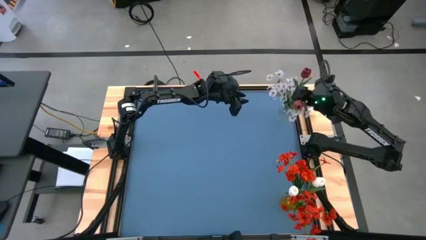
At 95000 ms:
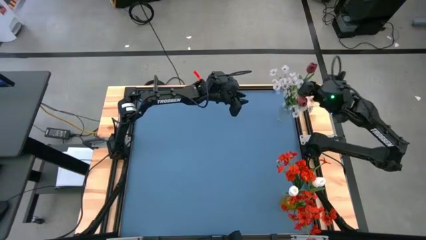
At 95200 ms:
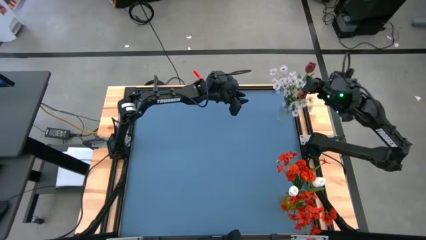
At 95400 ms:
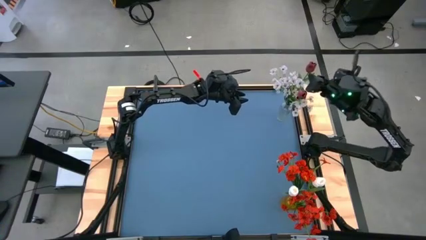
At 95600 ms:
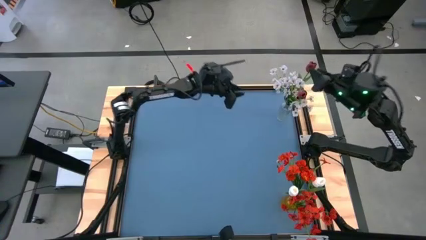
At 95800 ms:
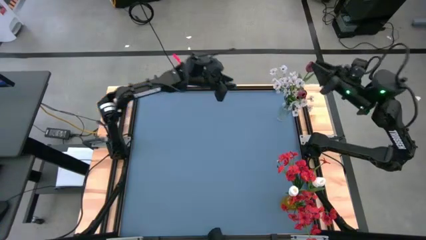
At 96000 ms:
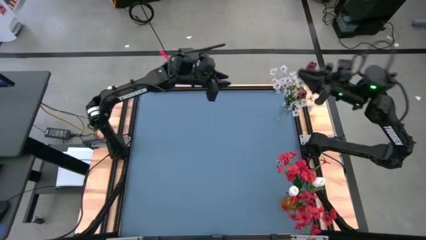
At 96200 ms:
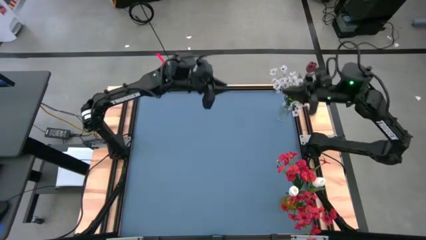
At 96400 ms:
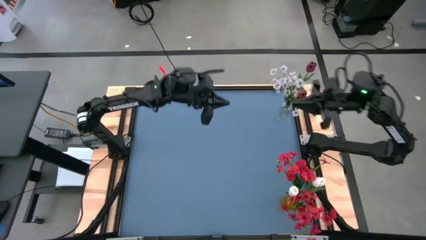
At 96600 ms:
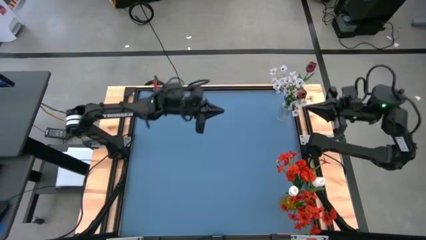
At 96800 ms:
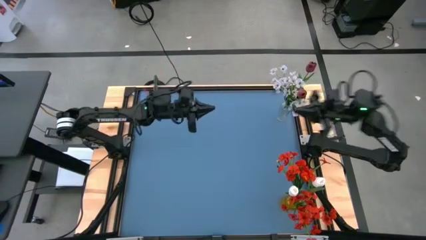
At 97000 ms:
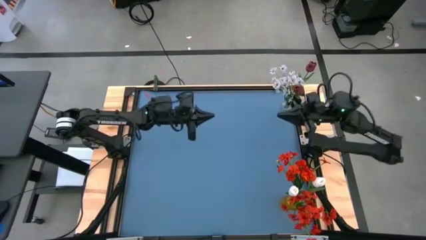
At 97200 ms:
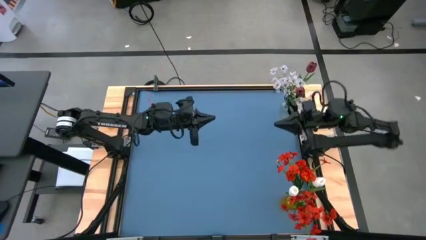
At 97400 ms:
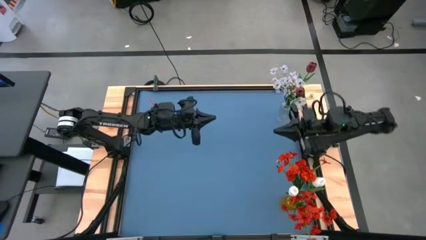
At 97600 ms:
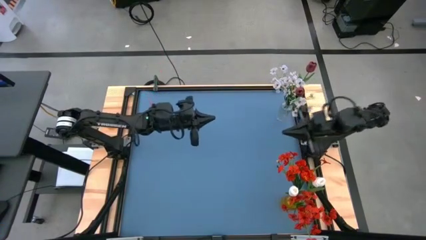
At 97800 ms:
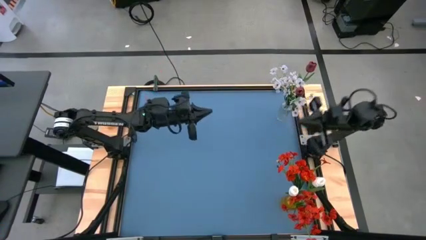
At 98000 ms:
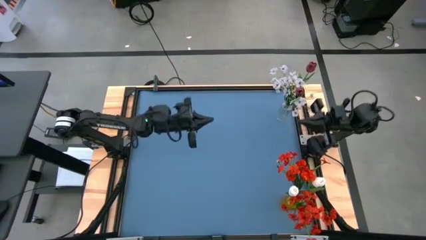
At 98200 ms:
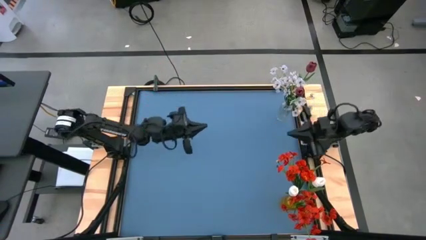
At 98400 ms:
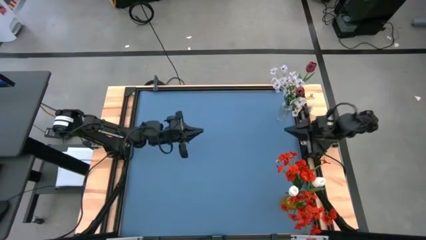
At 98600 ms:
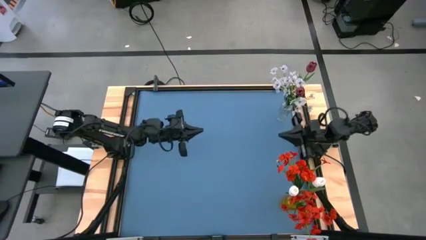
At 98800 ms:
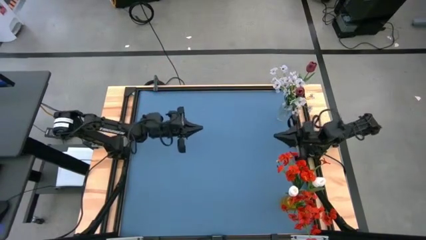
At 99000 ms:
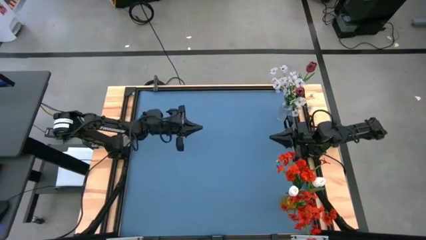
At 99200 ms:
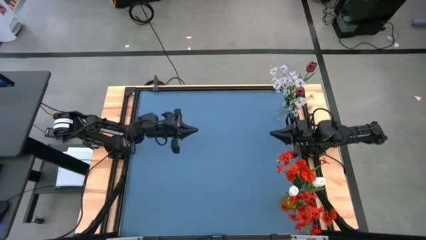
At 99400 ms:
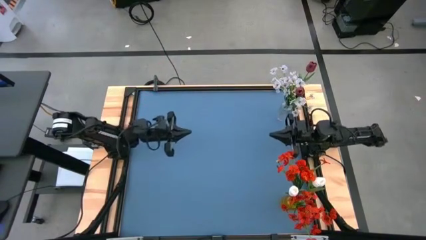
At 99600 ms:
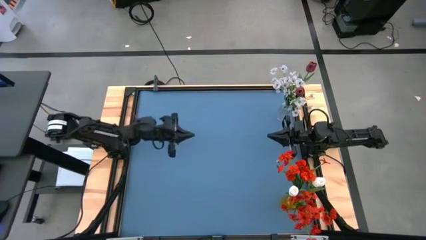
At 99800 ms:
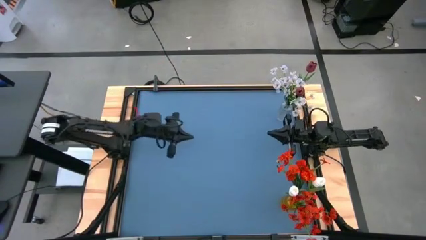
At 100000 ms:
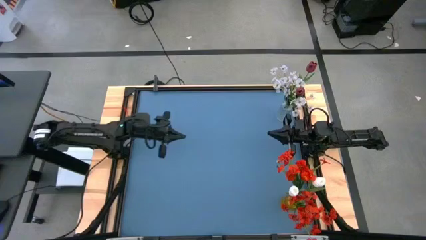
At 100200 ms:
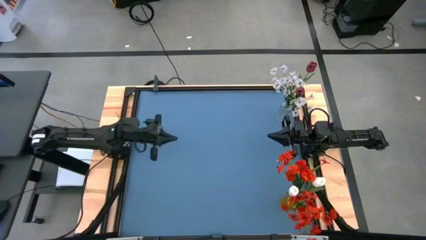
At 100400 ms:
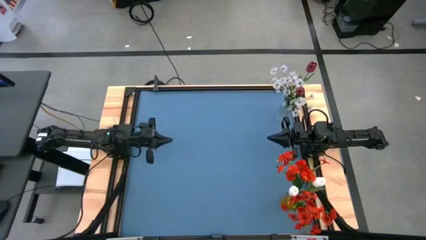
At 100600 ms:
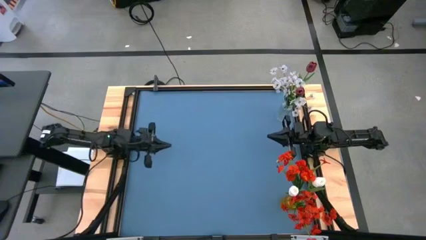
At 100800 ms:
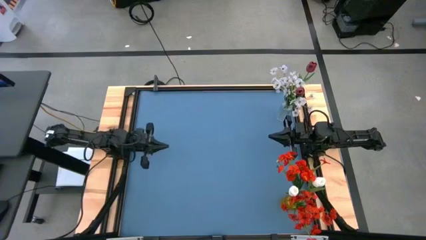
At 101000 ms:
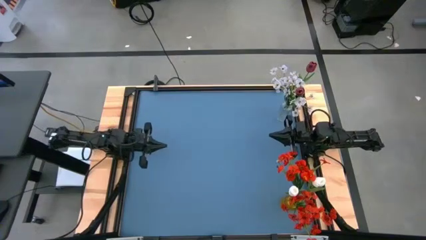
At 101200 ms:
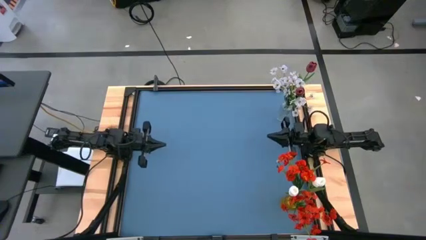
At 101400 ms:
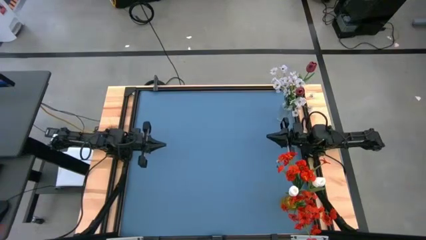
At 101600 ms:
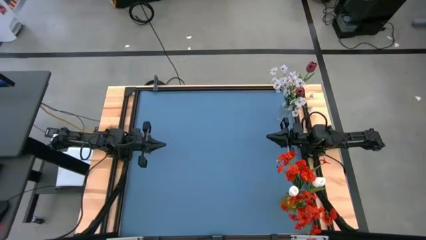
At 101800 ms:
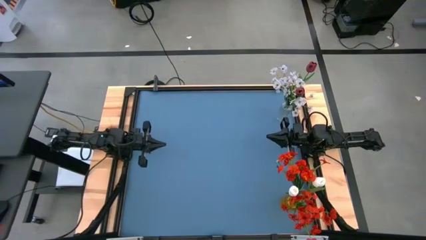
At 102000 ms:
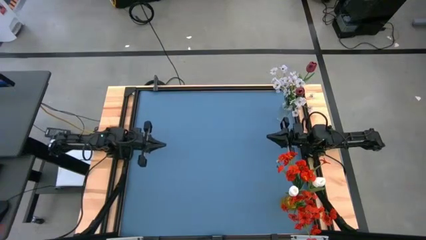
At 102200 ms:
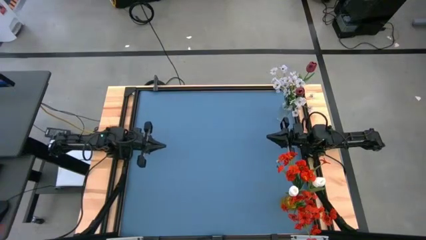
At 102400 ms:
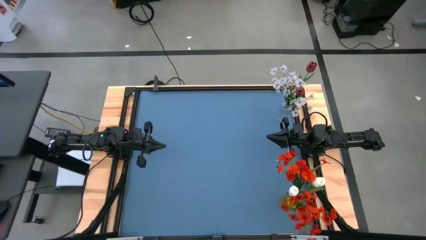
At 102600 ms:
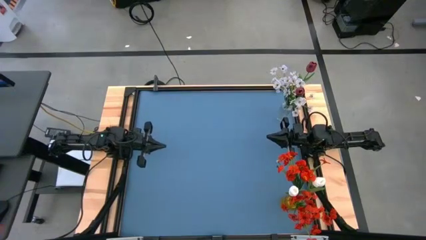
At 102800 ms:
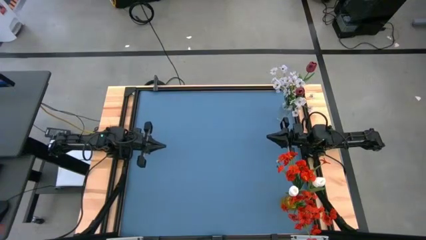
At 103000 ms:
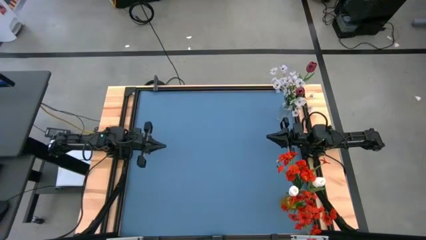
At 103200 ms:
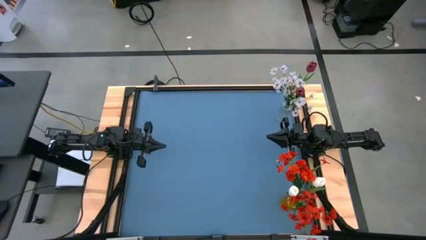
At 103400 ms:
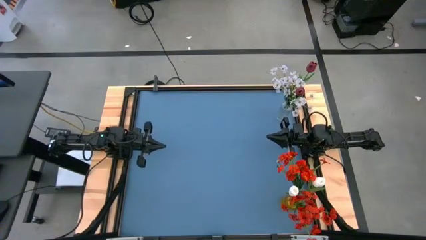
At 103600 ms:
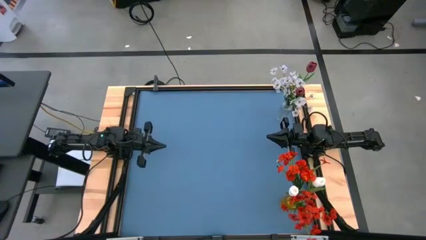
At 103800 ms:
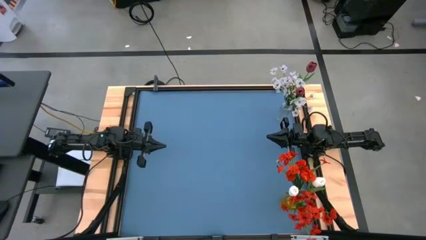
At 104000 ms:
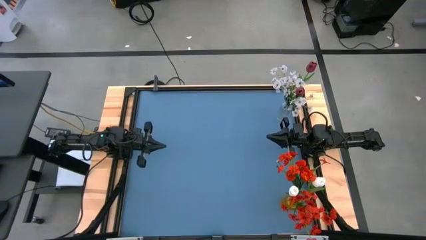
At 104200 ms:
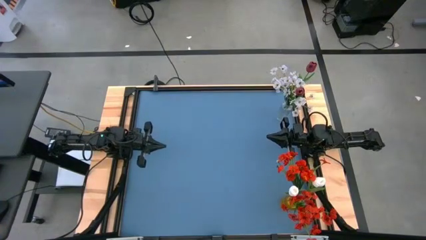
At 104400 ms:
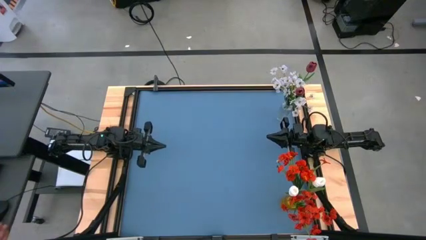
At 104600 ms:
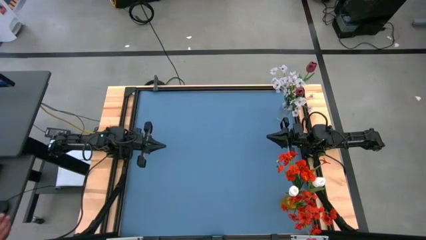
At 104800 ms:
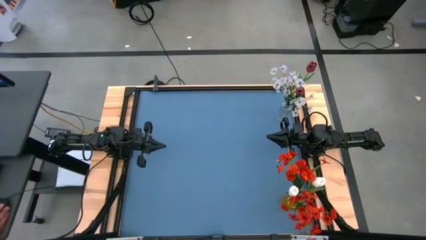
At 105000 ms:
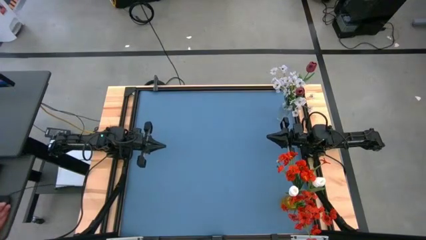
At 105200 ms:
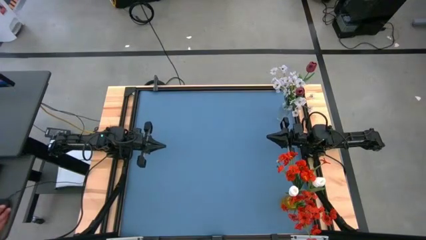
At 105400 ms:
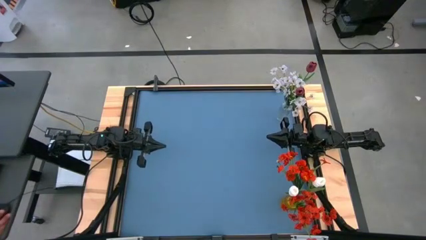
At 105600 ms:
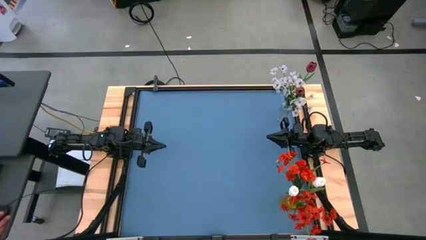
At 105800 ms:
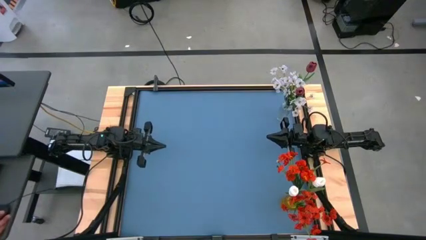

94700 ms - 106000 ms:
Task: Sort flowers into vase by color
Return to Home Position

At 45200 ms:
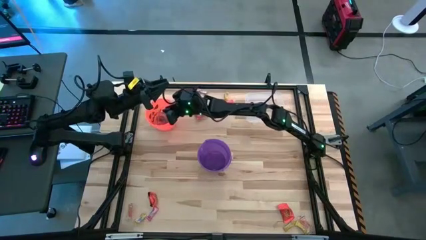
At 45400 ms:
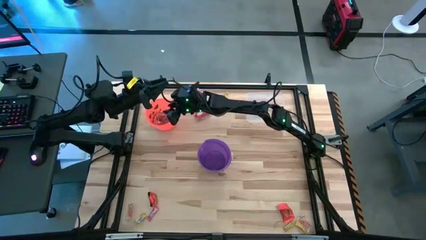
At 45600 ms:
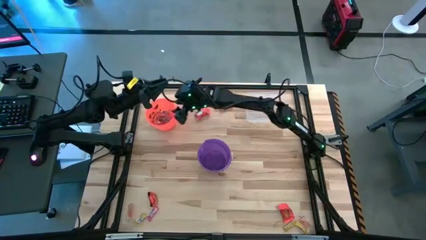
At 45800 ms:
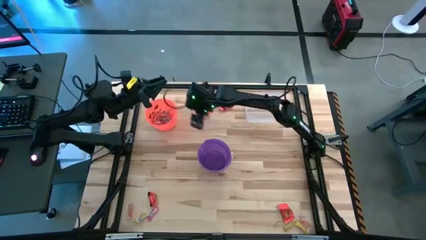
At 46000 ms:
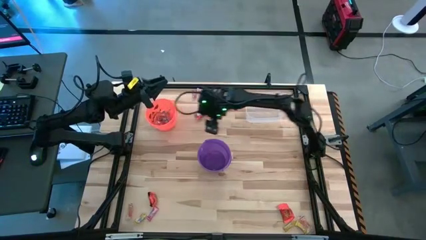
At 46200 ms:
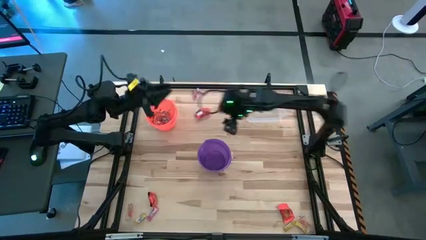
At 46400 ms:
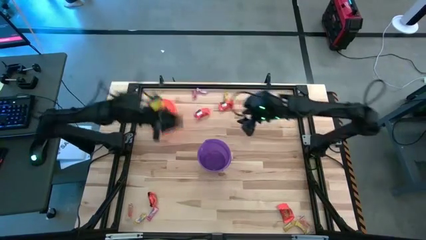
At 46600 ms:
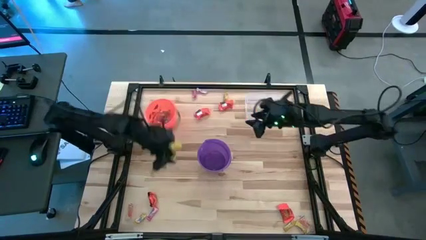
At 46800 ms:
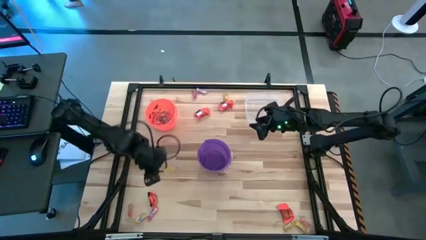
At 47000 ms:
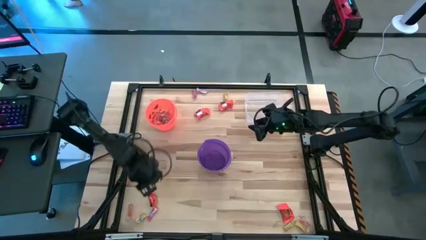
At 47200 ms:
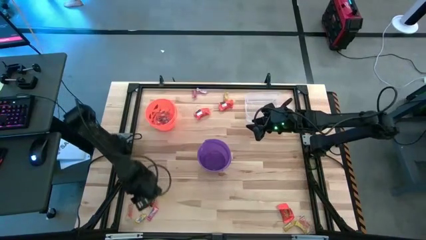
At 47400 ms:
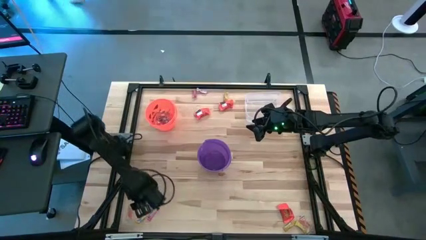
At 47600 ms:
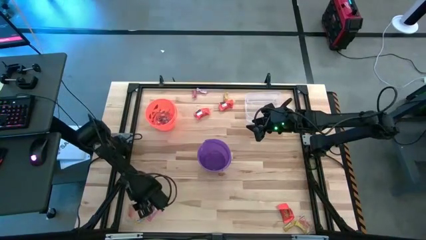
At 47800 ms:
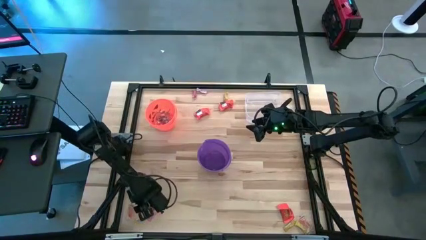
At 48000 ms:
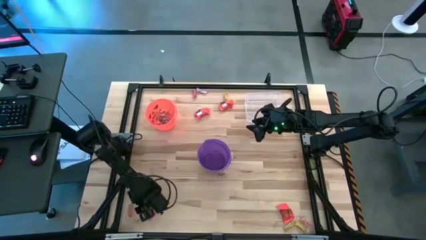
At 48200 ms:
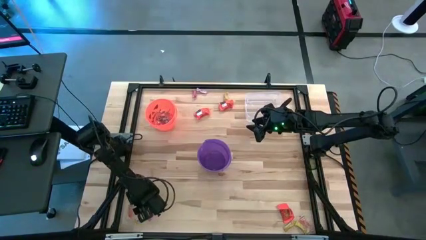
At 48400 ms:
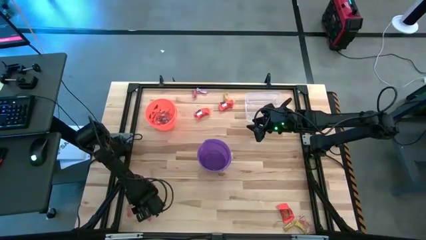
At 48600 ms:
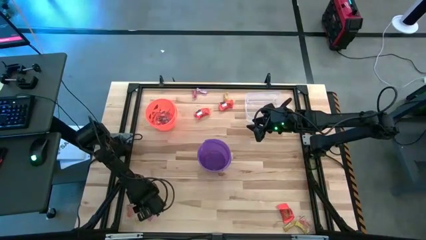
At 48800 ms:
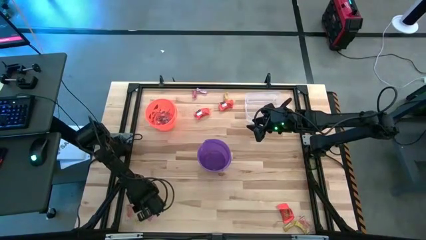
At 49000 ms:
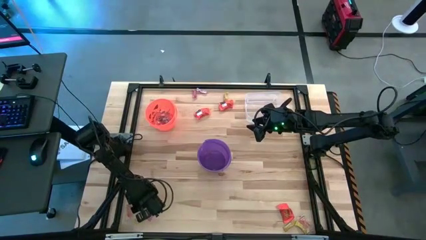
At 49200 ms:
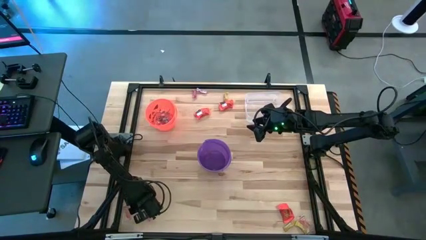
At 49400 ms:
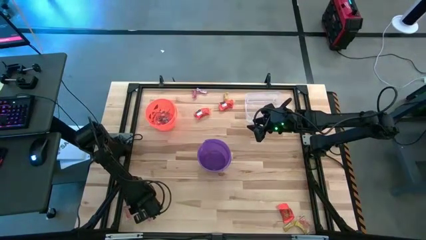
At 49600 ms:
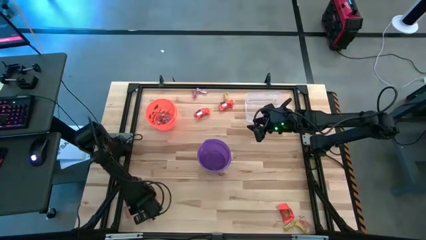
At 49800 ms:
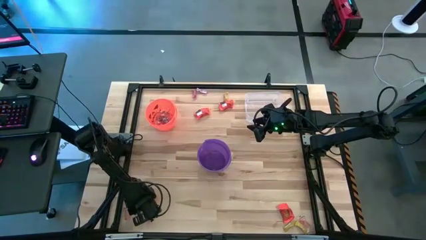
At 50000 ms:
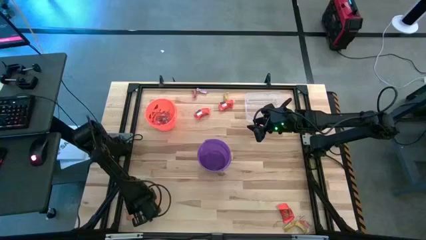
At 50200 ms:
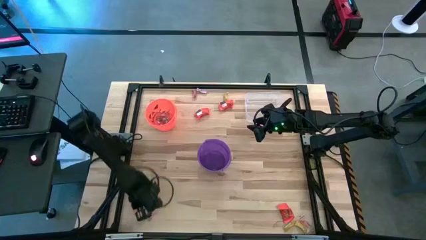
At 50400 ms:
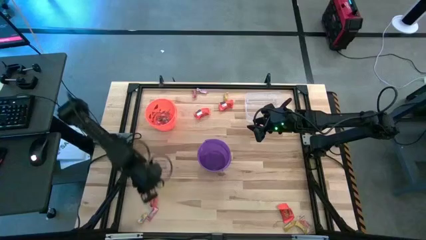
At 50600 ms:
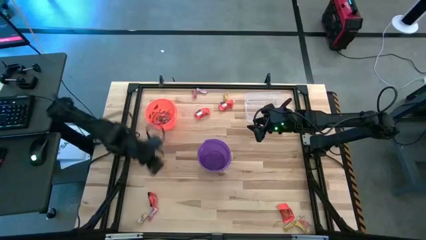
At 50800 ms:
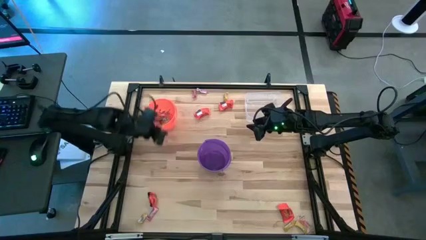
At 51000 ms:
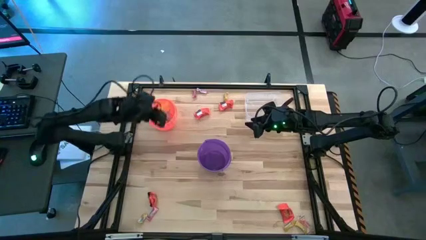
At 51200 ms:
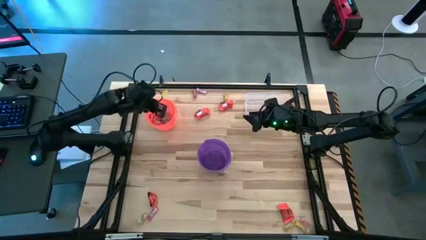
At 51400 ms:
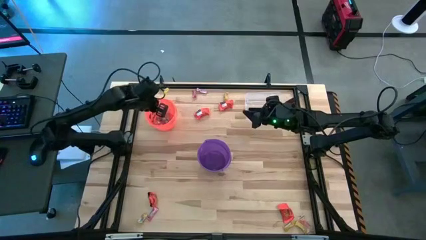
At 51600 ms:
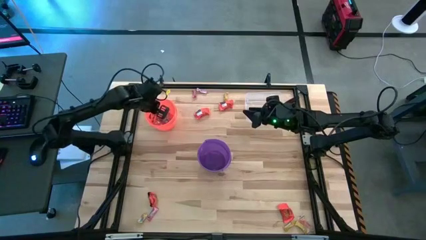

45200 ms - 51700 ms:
Task: Sort candy by brand, put in halloween buckets
Put the orange gummy into the orange bucket
